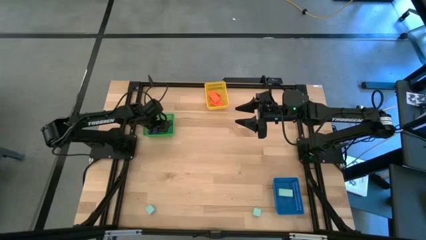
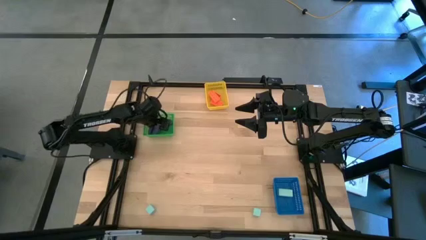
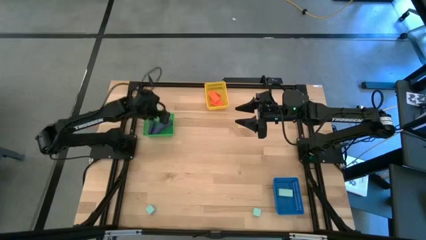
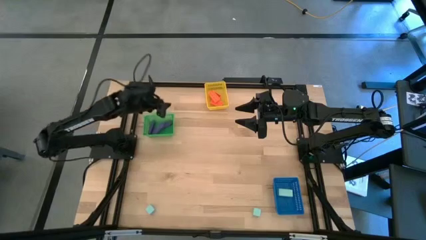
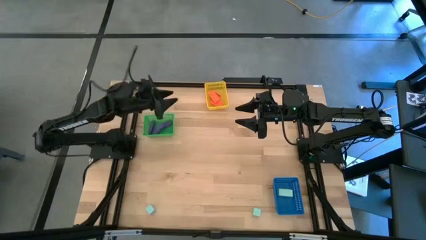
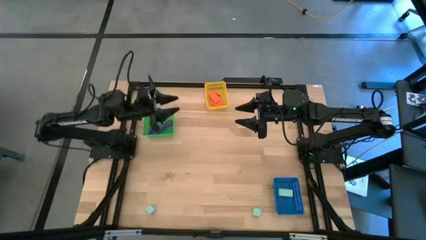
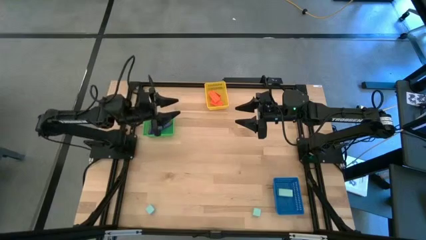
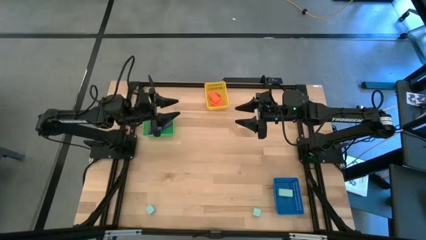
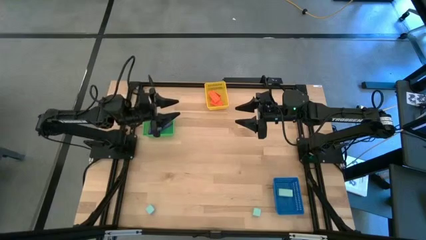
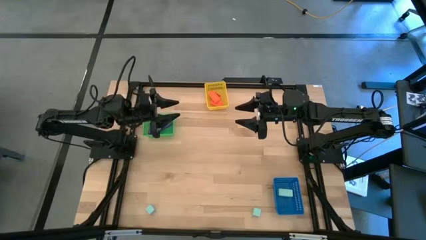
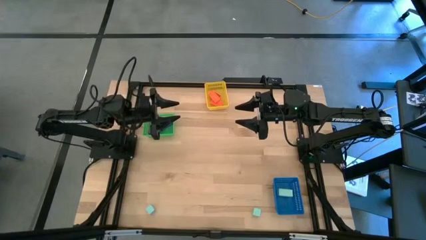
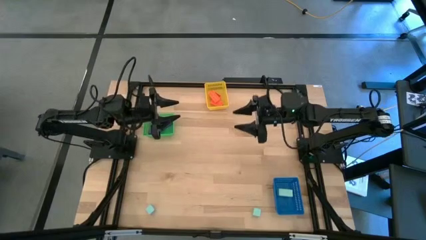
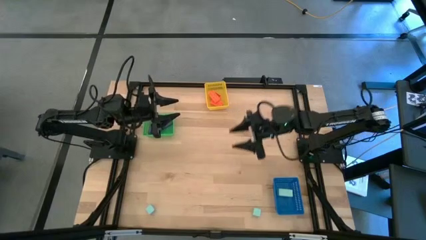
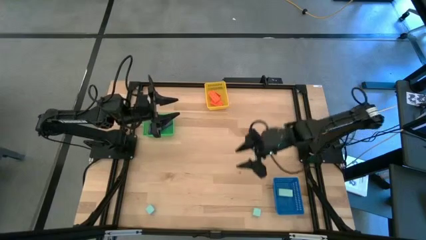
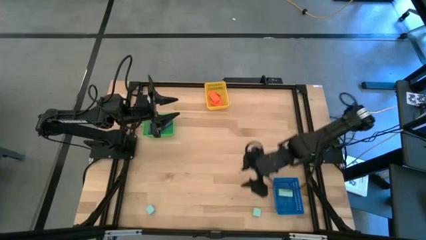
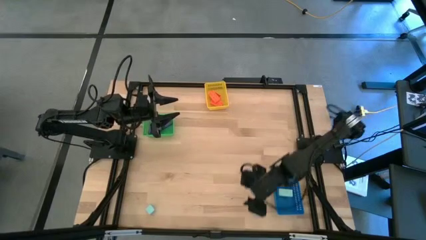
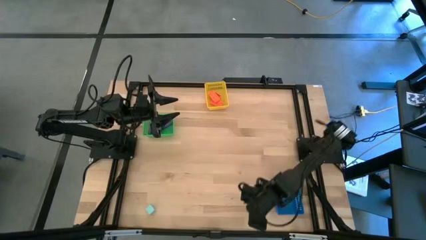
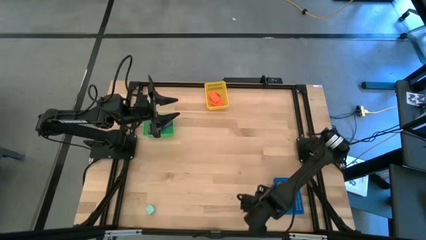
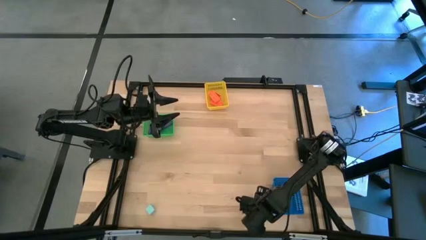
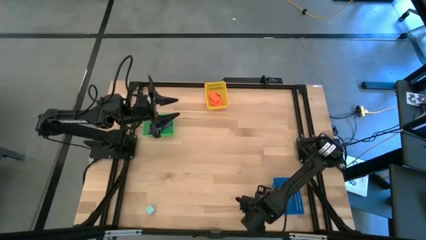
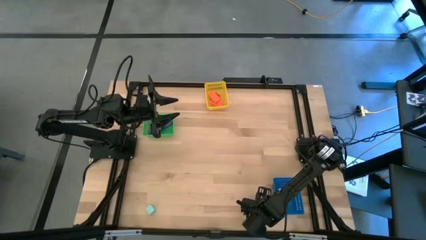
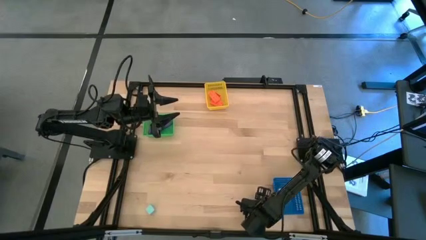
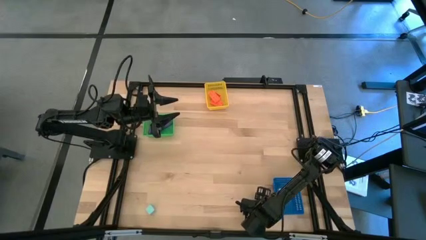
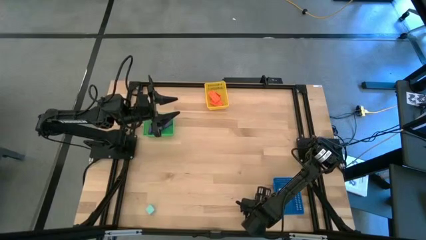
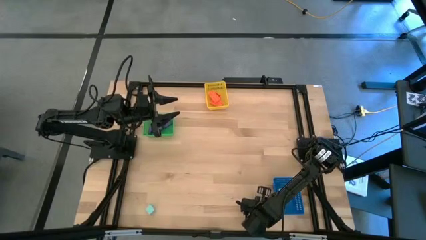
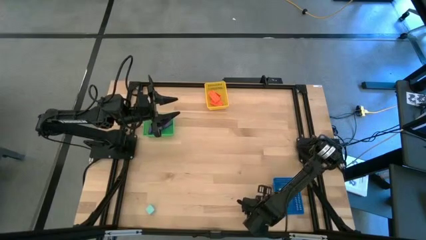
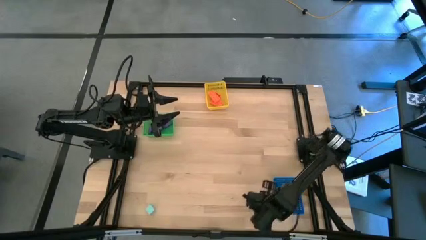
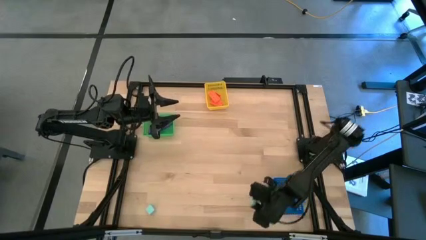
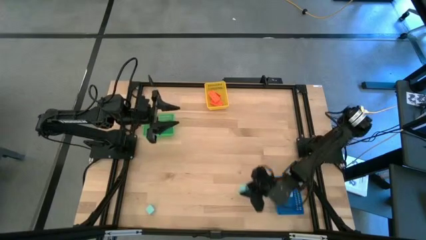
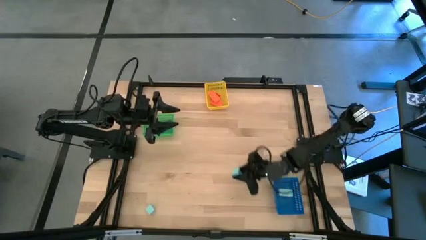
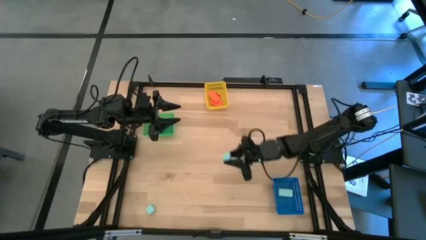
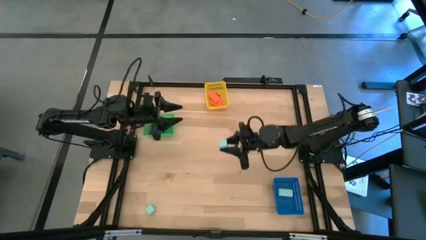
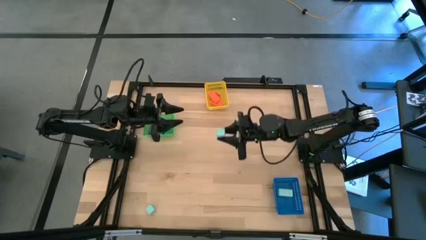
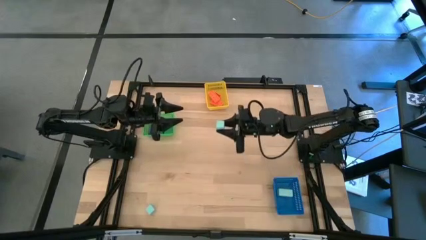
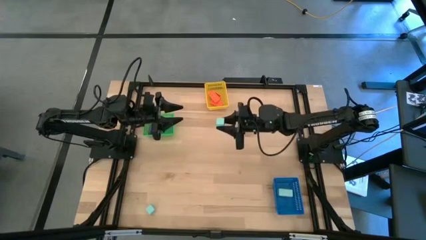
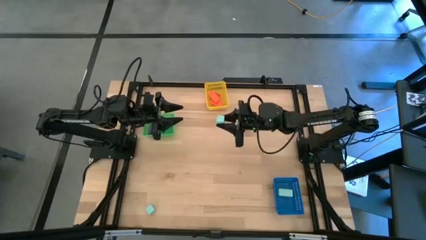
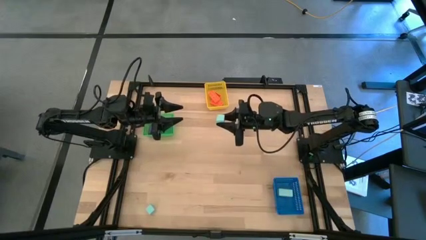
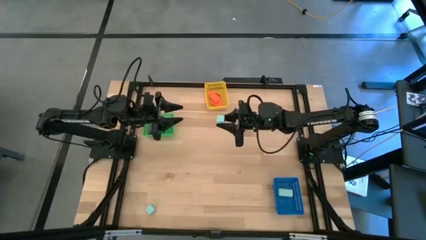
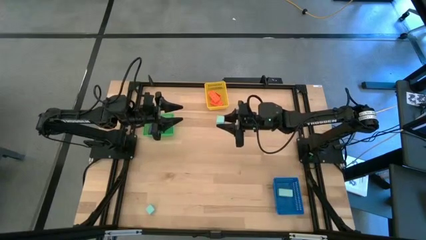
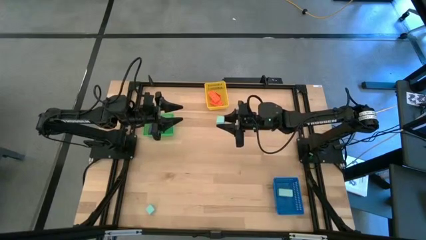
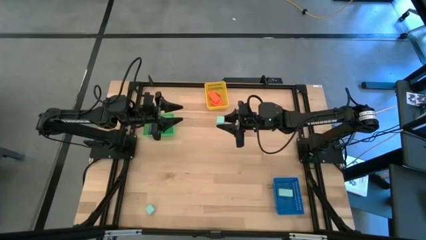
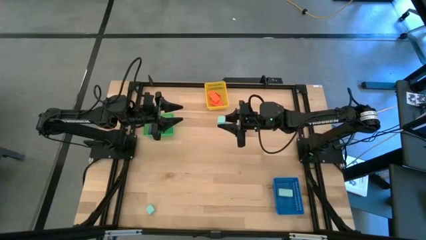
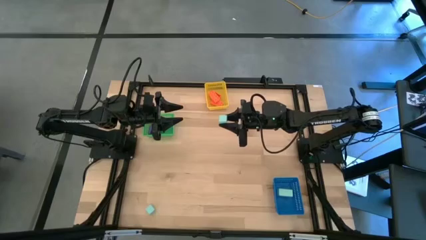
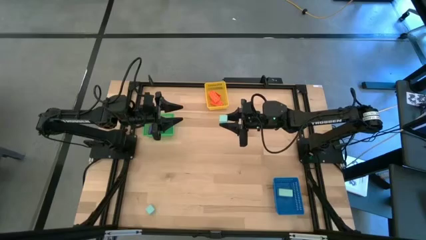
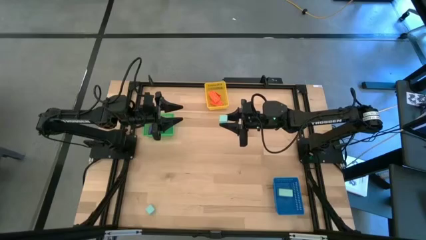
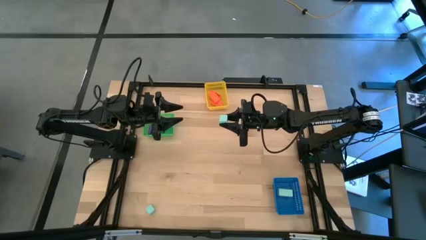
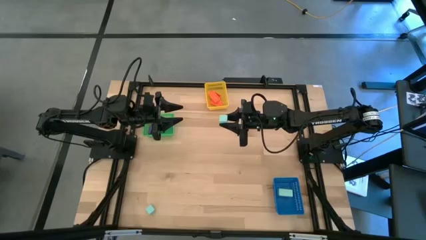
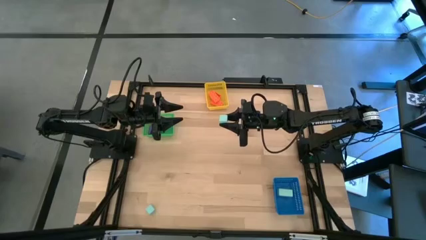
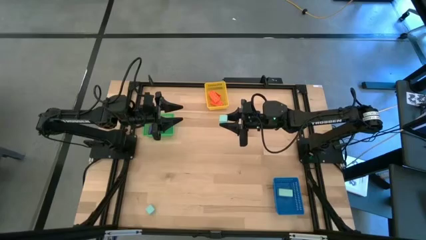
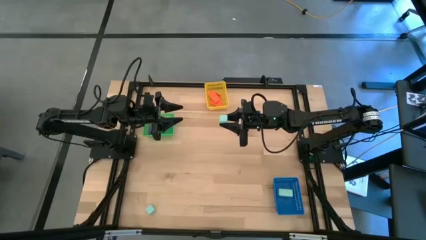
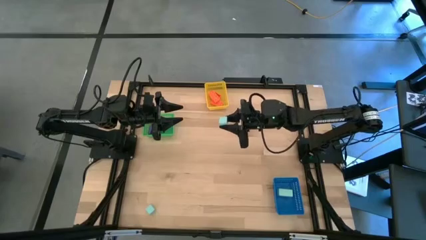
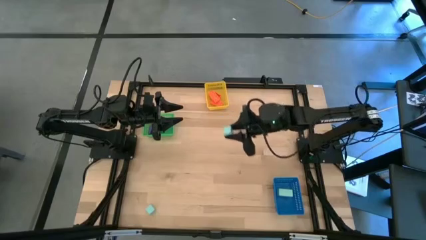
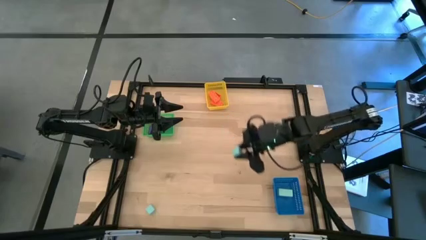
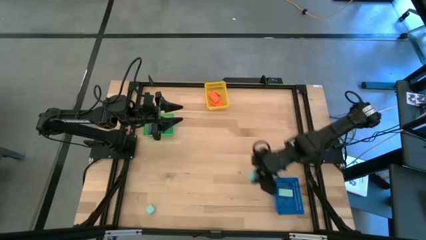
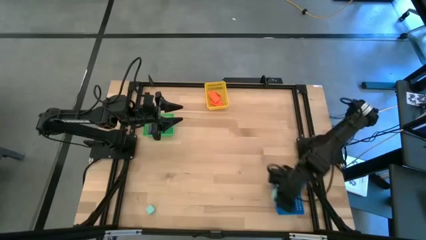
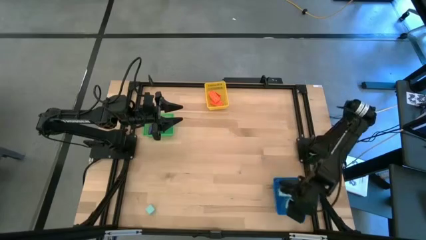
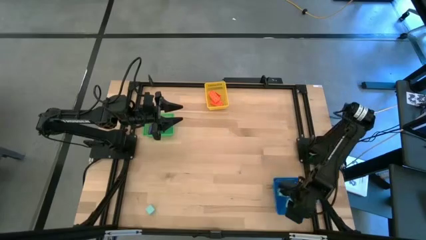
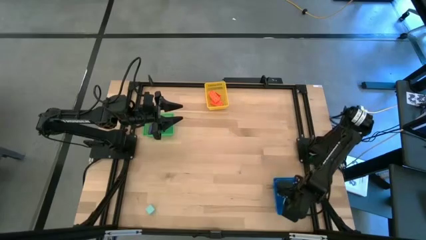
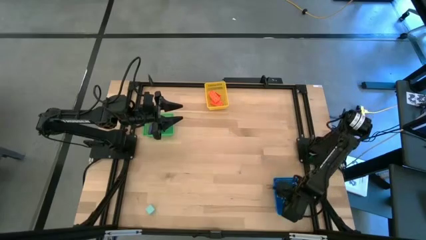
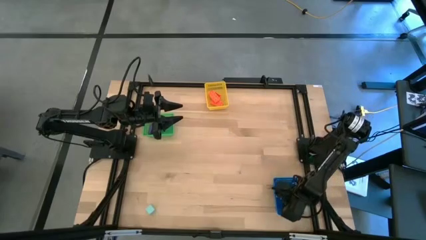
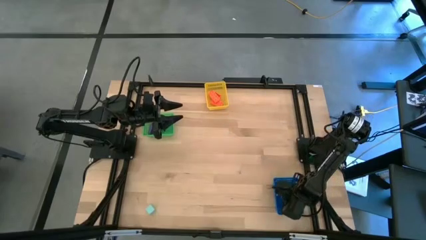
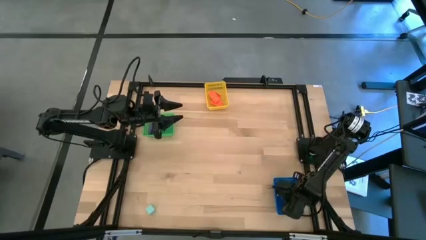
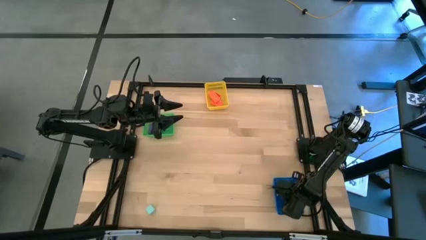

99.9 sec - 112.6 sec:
Task: Sort & place blocks by color
Put the right light blue block into the blue bin

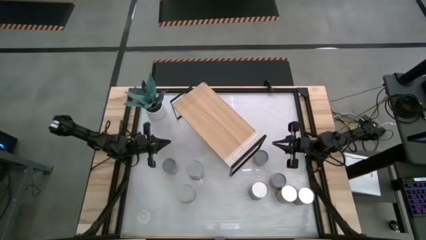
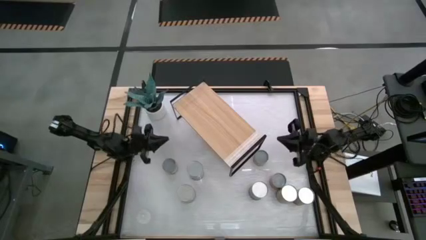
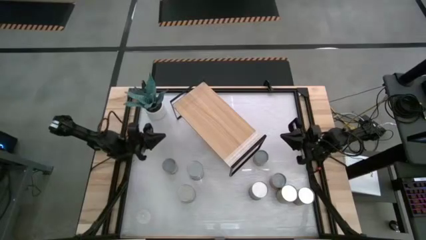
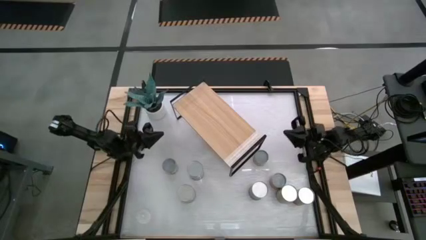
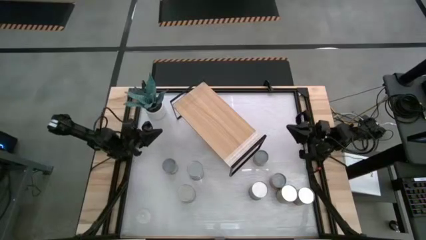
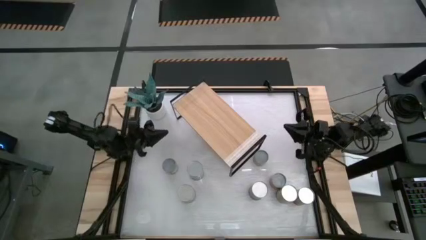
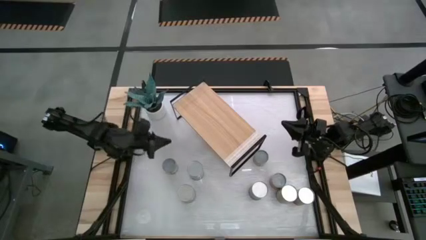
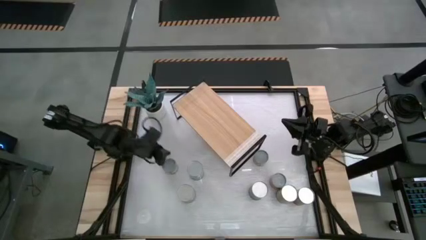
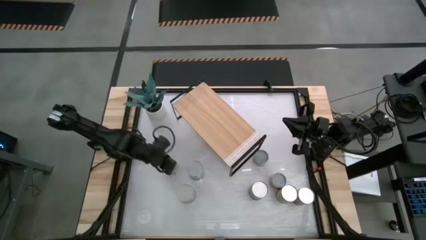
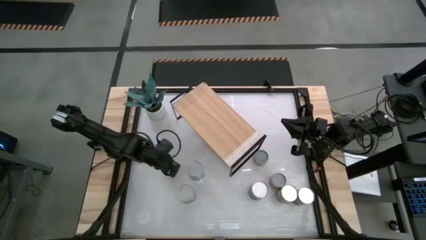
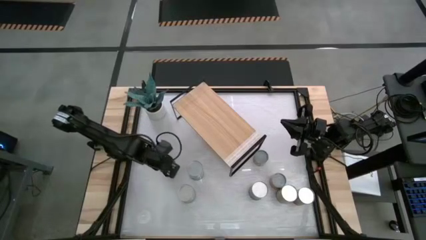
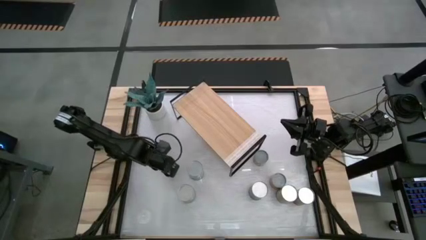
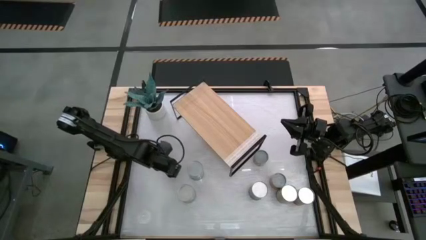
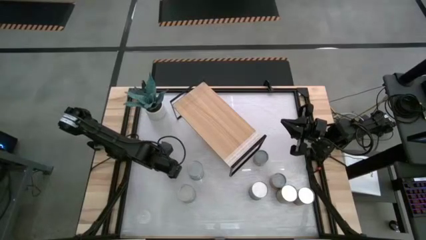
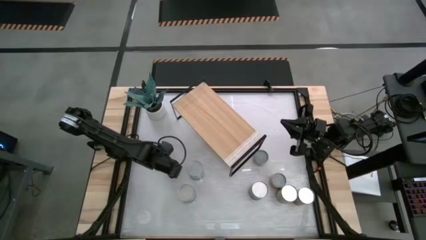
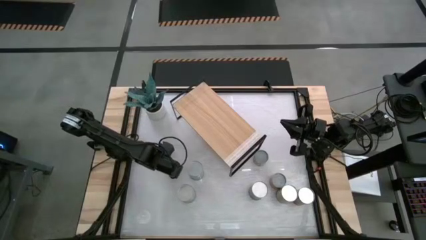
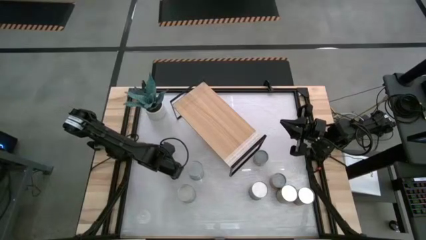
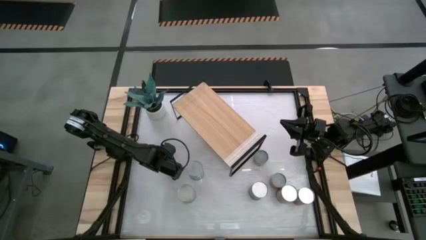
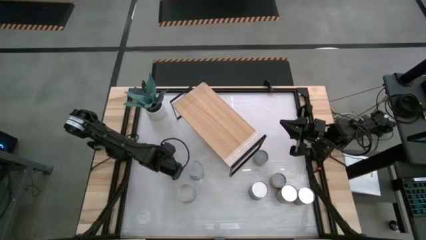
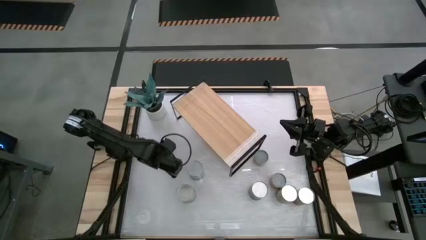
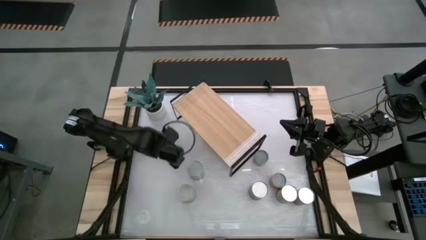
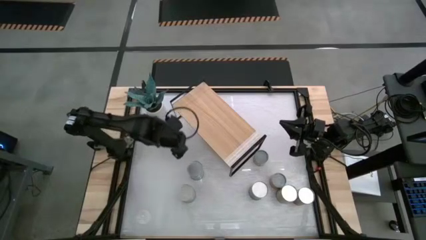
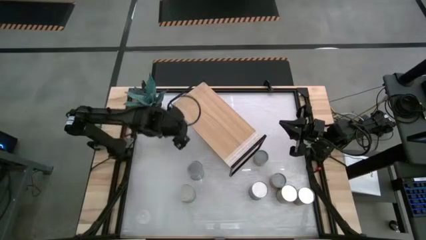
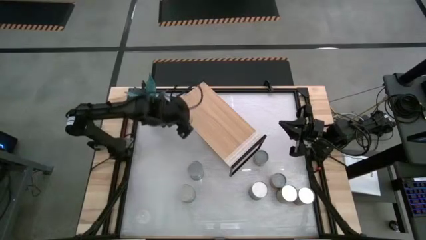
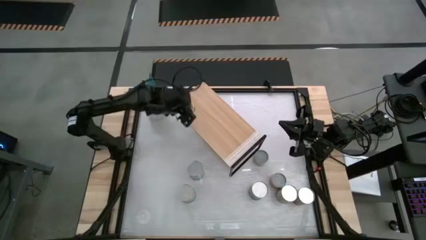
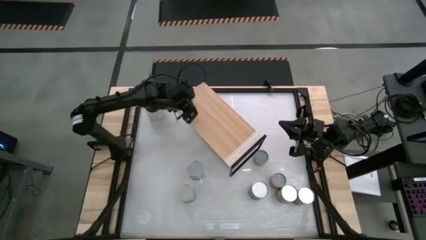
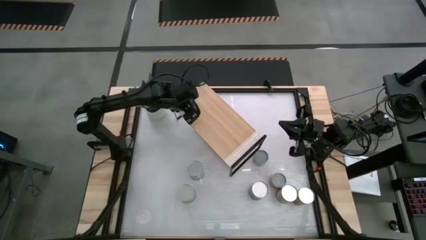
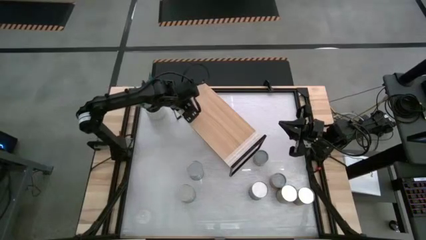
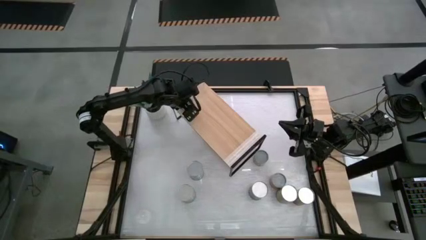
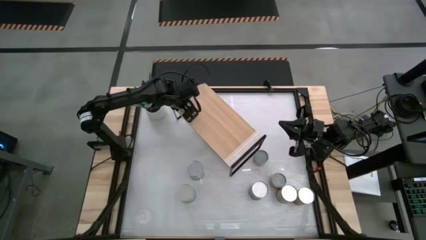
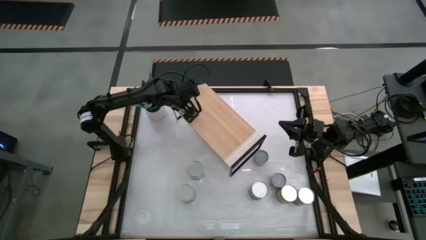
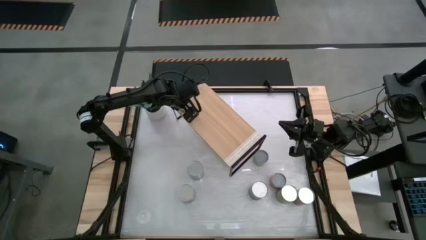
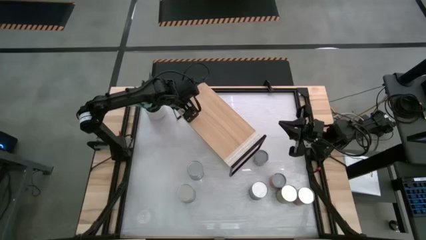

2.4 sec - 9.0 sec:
Task: Pick and place cans onto a shelf
Put the small canned peaches on the shelf
